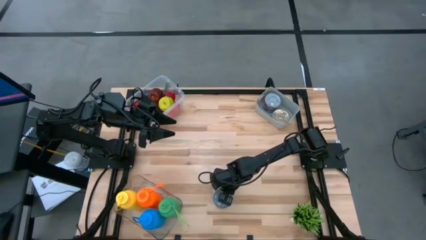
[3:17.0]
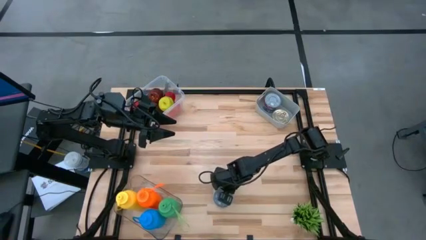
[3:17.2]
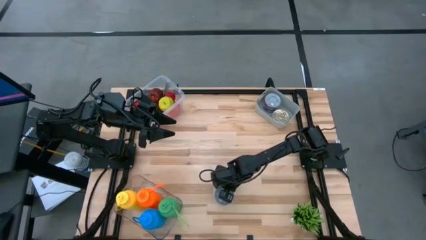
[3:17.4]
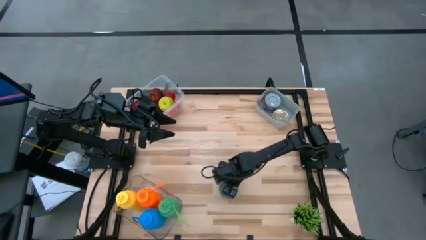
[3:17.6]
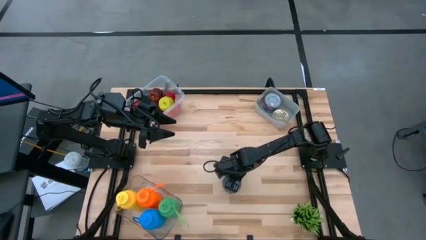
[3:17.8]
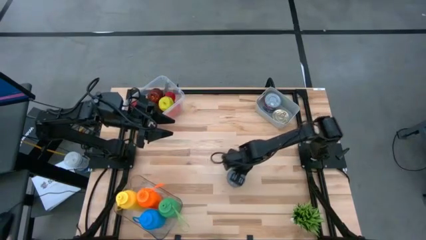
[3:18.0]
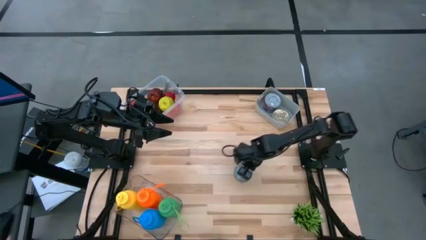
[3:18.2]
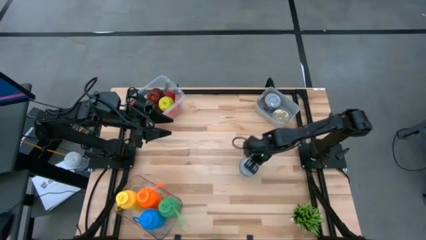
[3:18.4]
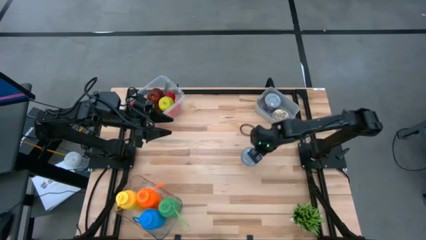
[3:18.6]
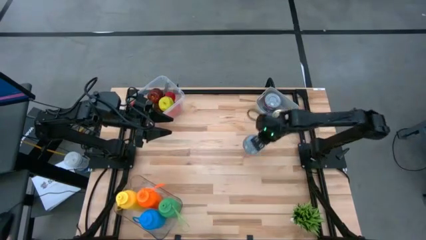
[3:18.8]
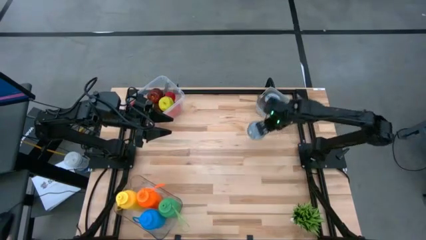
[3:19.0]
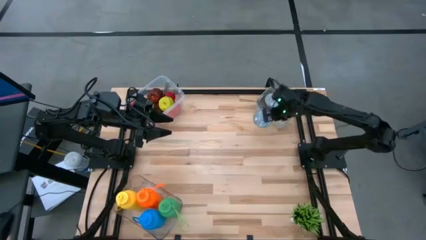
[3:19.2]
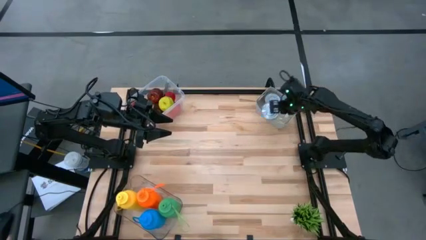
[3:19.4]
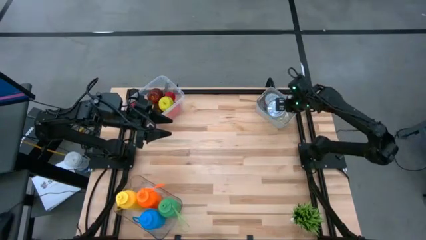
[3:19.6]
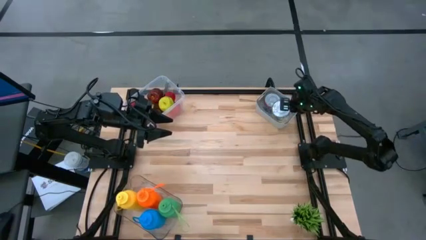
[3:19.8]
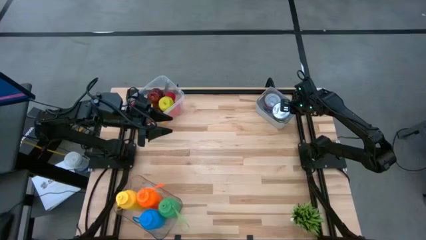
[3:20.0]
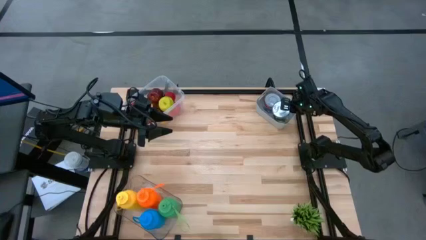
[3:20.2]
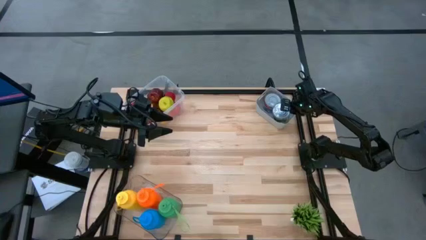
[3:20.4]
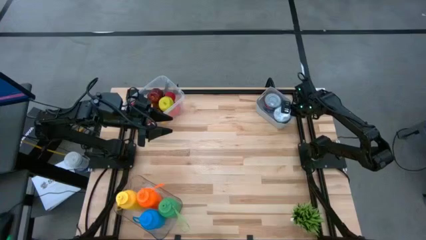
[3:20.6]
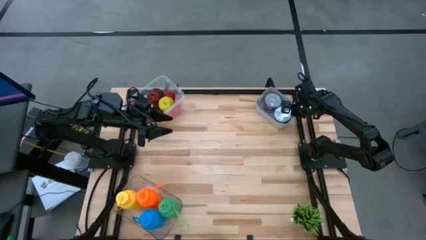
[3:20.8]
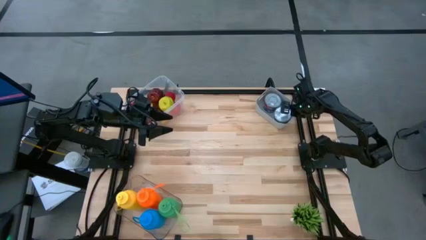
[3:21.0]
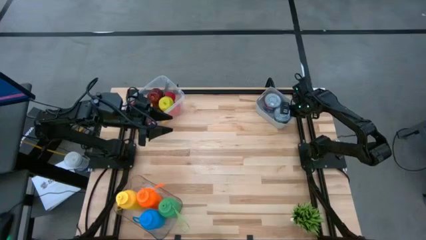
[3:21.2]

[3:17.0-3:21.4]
Task: Pick & Place Food Item
Stack the green tuna can on the pink tuna can

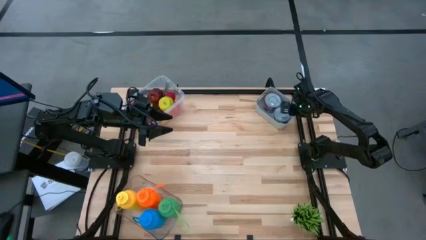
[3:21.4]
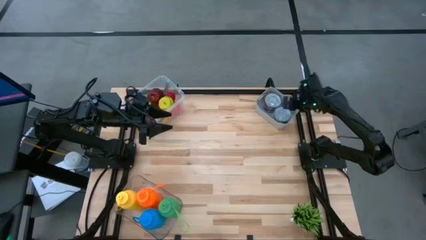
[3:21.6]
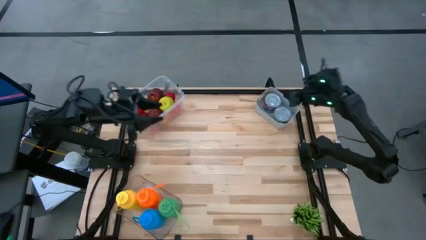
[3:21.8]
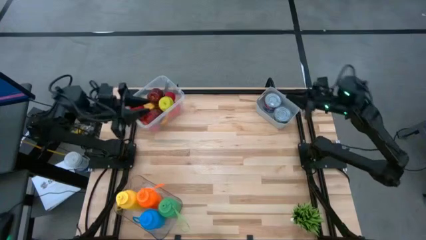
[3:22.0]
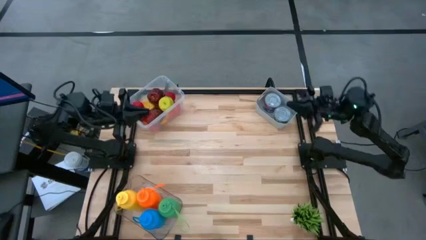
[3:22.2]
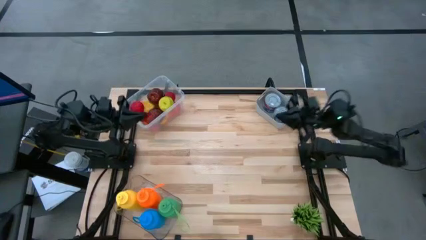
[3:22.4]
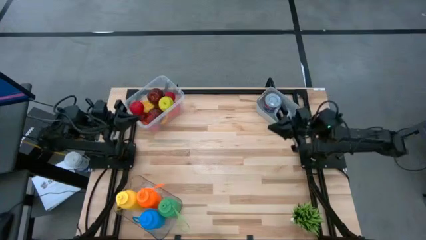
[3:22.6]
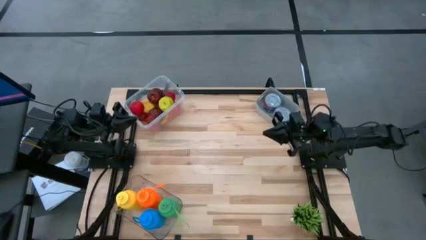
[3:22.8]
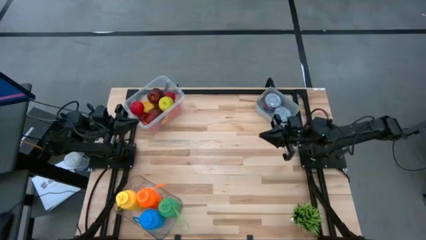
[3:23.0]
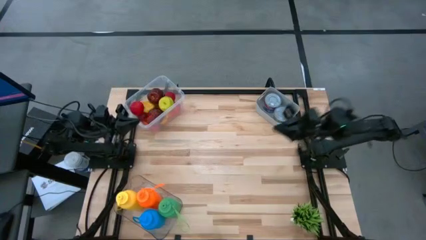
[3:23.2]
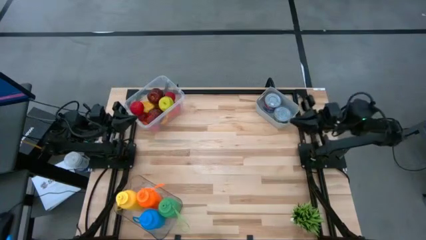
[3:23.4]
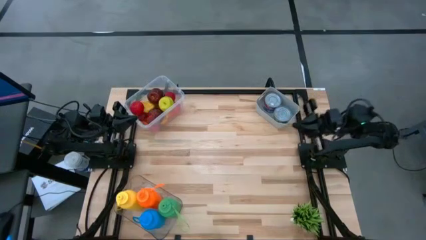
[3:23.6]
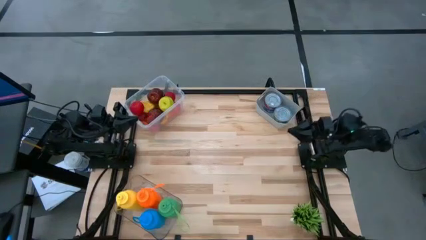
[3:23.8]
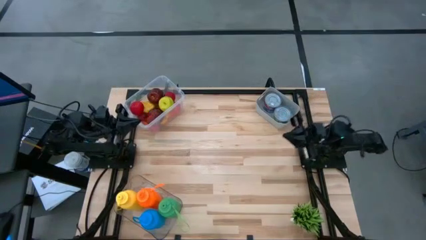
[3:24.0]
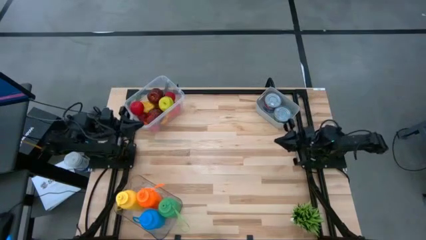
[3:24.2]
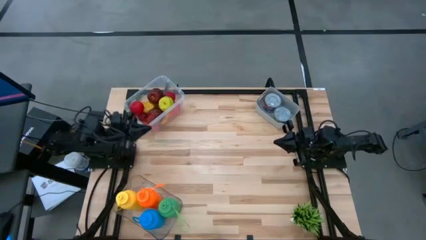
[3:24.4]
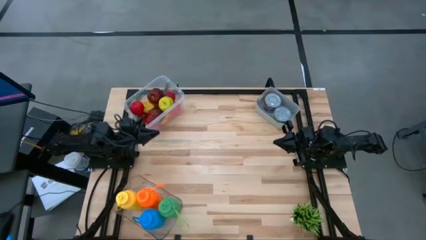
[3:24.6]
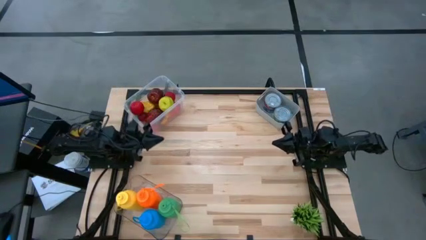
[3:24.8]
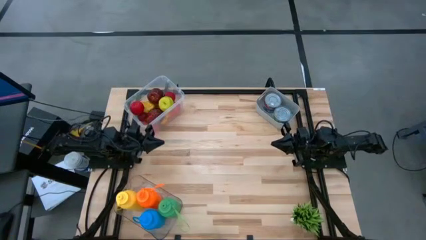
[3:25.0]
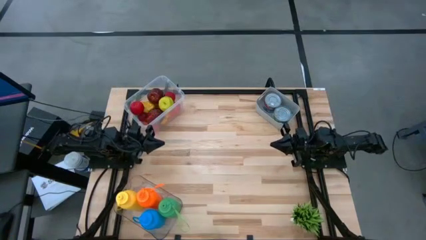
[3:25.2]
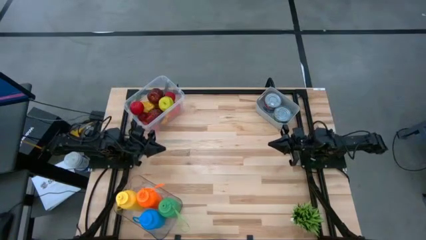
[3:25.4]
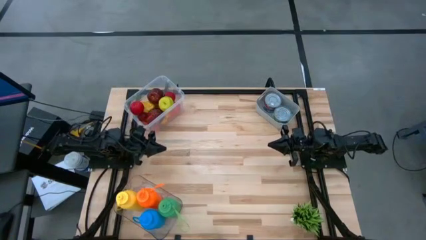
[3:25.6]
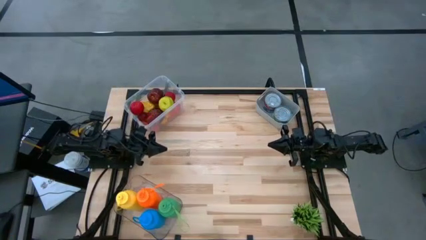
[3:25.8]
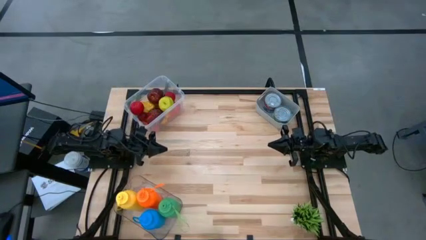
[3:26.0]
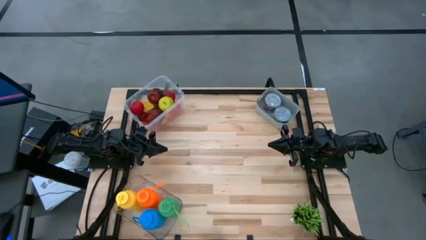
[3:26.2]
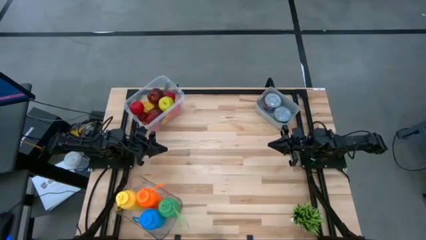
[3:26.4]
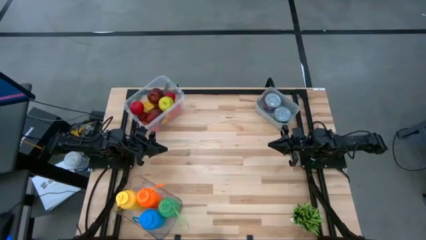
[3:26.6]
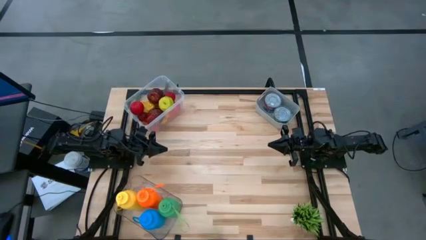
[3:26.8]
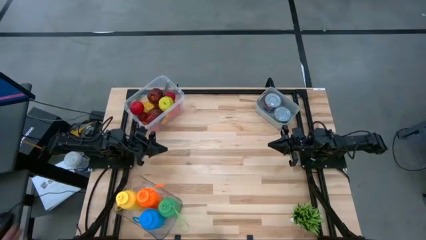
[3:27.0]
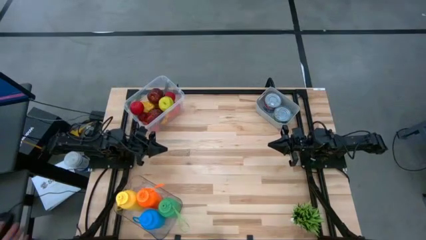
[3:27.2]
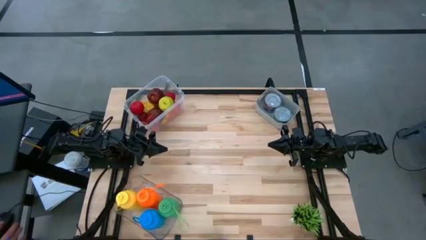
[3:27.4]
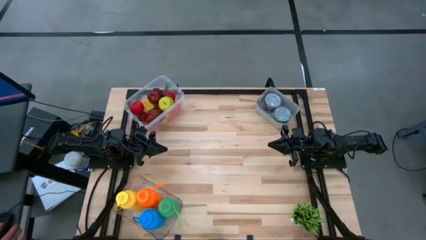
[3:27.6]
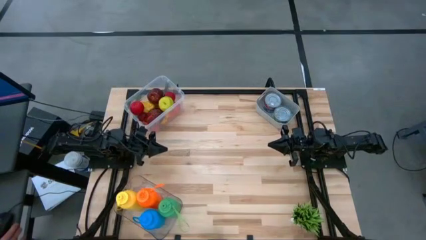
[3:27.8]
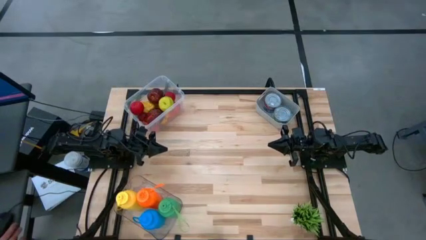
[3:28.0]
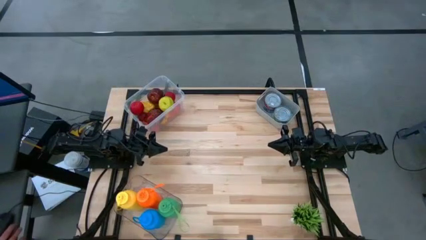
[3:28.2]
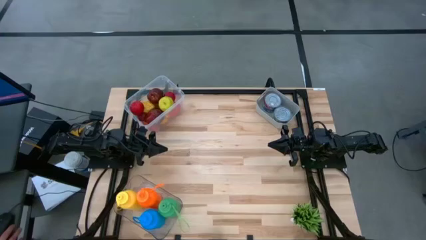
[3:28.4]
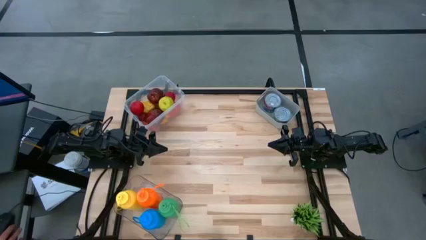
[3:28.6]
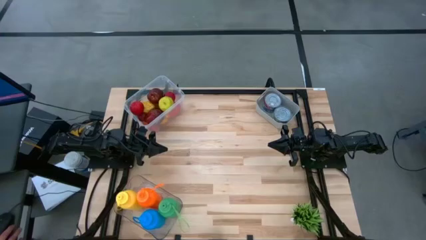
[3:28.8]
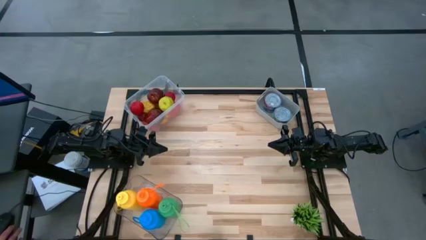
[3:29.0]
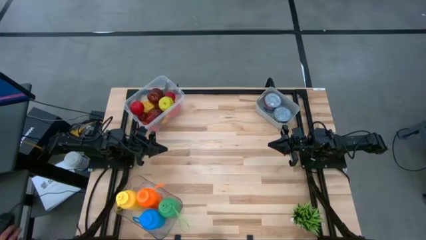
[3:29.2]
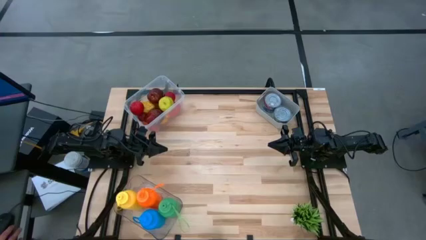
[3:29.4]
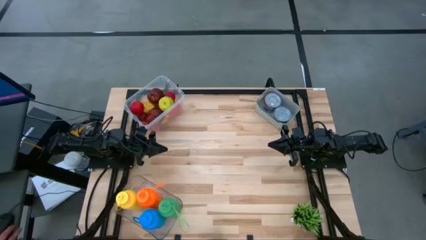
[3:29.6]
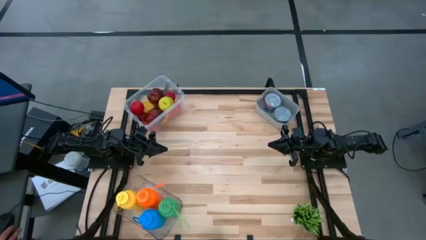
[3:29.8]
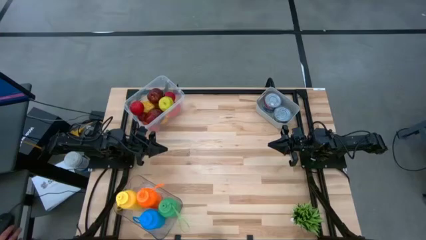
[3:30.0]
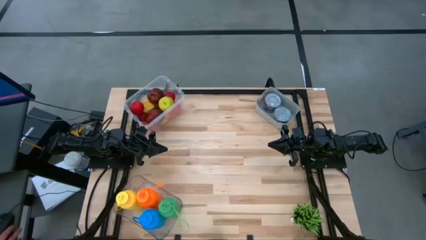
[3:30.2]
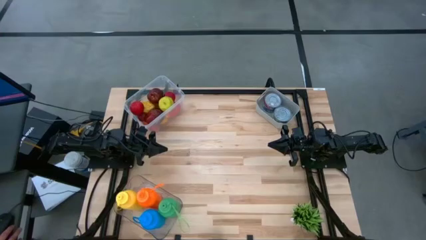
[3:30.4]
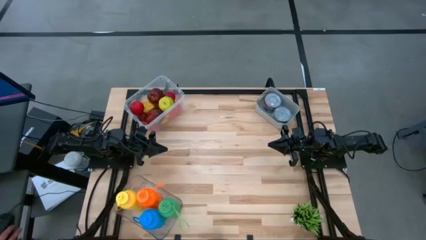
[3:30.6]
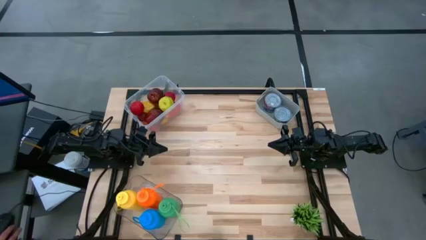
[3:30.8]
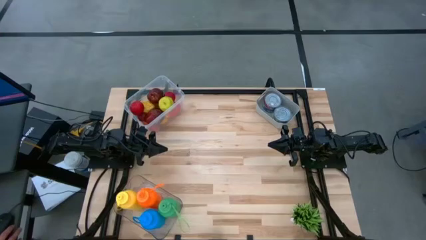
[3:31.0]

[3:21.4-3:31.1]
Return to Home Position

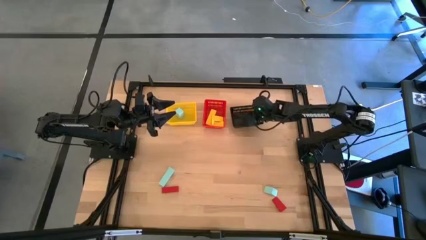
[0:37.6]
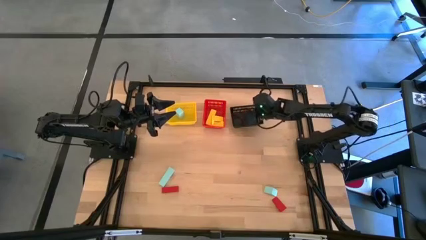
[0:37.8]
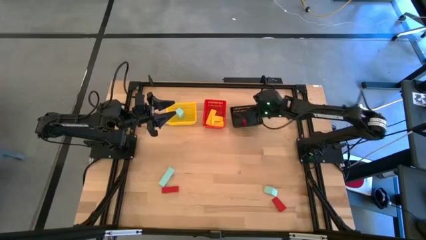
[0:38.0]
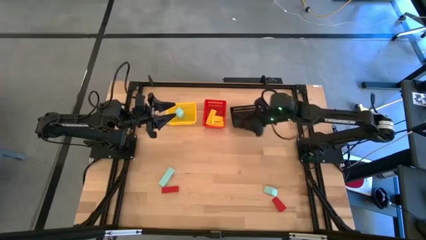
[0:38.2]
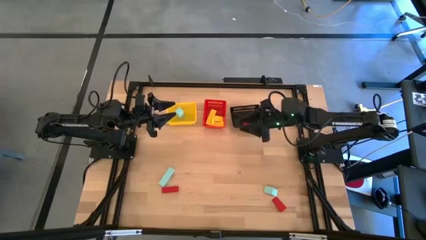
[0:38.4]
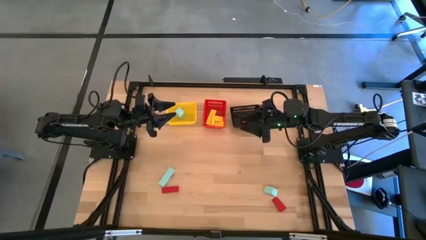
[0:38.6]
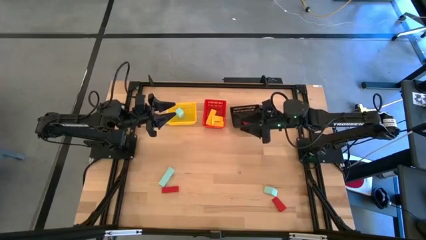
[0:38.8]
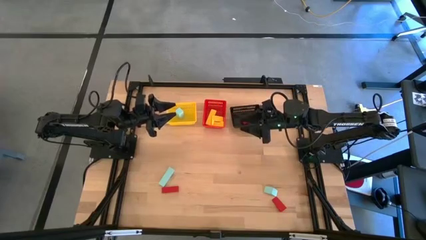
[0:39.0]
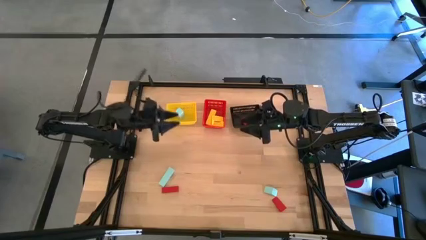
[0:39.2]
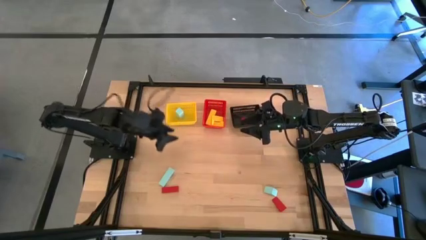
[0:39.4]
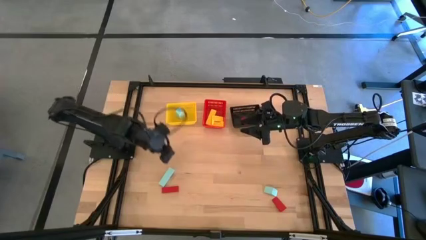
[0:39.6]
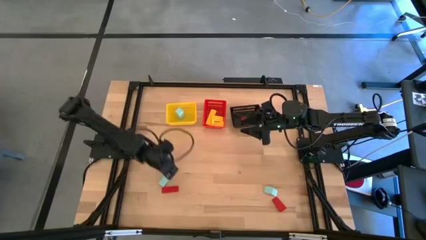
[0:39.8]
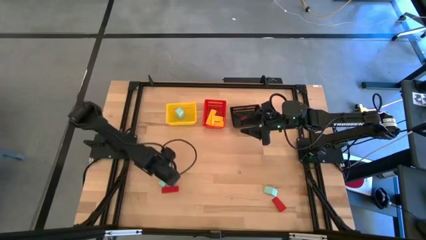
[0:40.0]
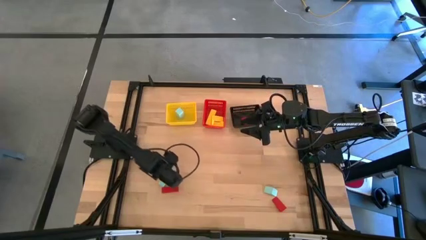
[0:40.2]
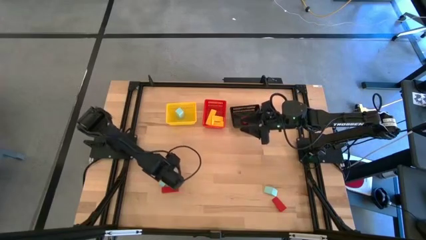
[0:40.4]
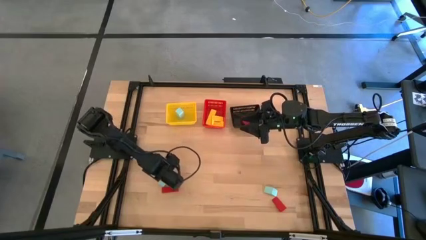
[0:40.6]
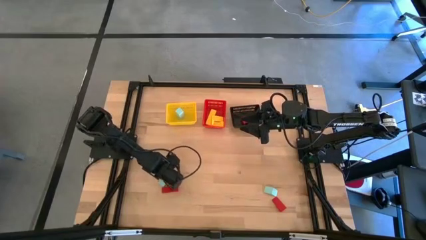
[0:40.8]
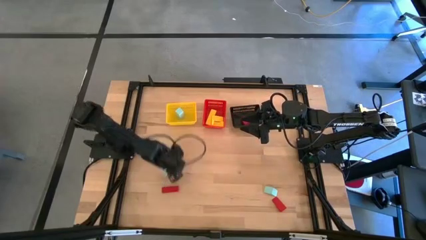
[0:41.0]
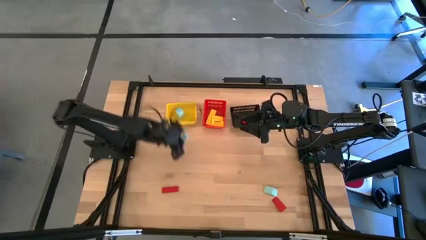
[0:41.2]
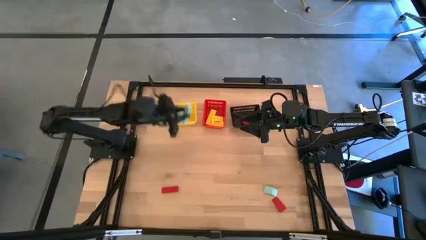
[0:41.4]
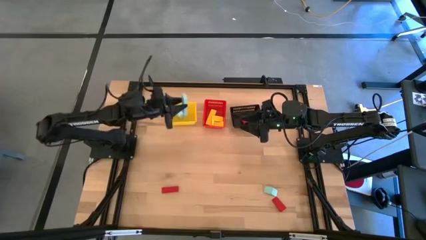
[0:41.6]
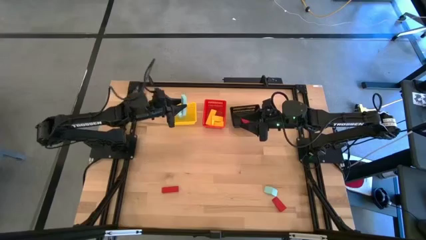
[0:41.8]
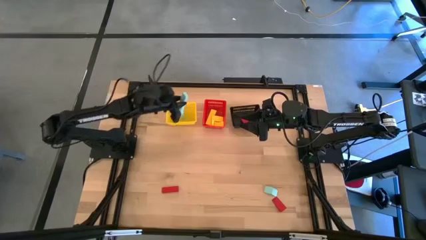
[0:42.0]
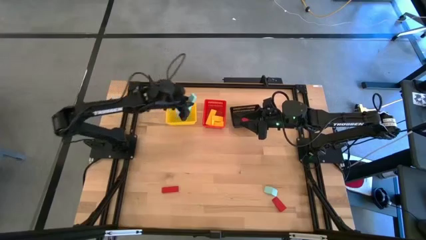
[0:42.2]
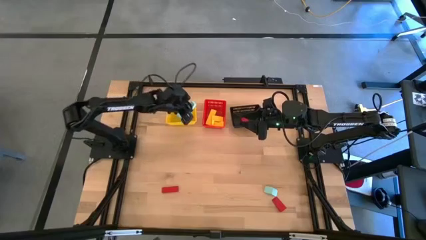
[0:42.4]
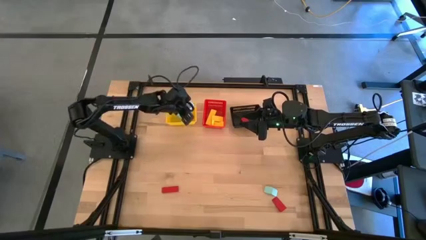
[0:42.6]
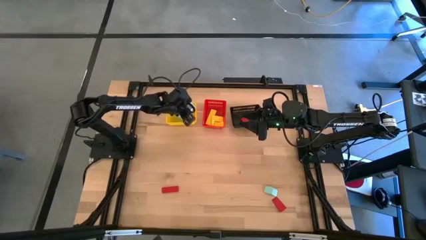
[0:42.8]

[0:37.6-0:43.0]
Task: Sort & place blocks by color
Put the left light blue block into the yellow basket
